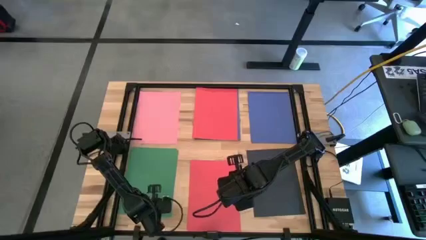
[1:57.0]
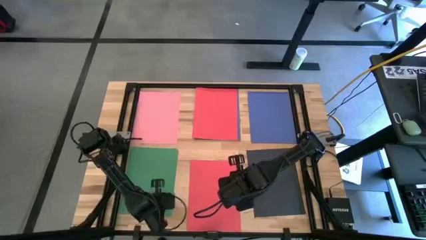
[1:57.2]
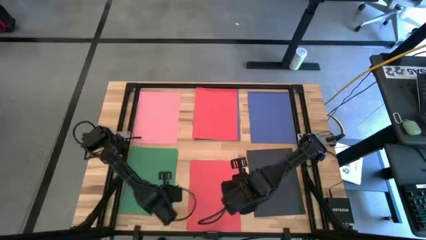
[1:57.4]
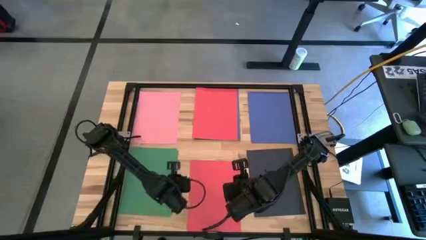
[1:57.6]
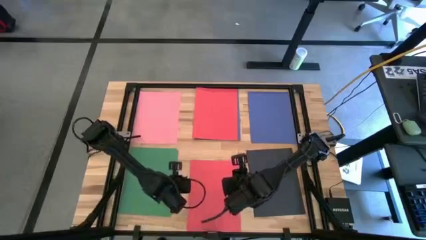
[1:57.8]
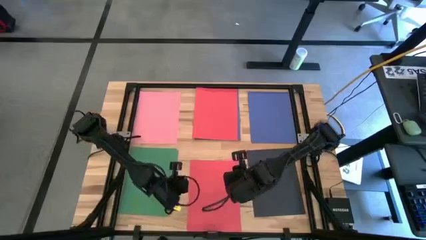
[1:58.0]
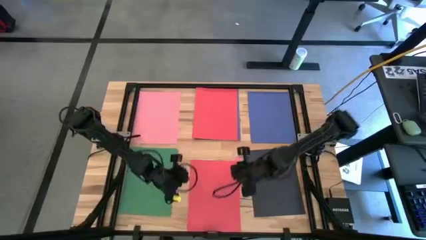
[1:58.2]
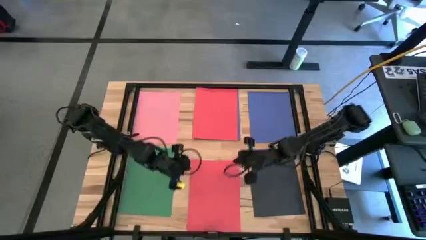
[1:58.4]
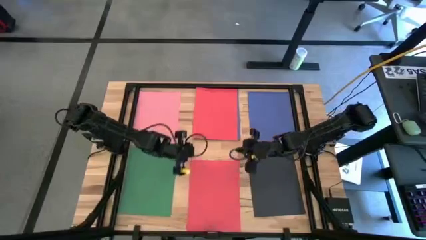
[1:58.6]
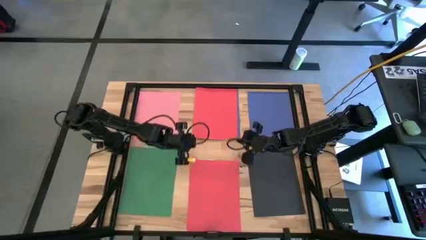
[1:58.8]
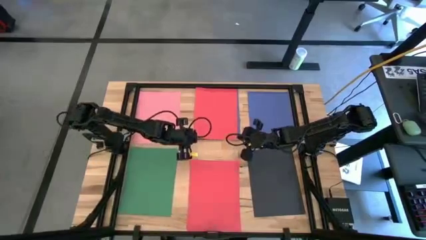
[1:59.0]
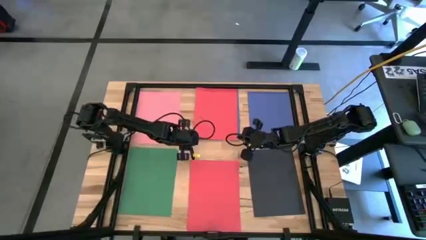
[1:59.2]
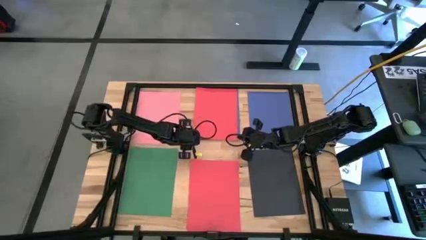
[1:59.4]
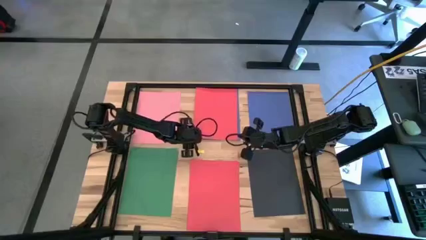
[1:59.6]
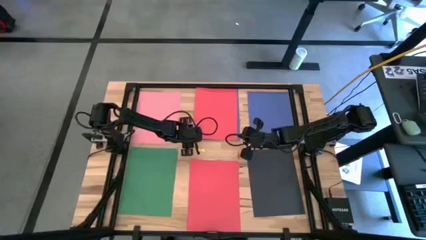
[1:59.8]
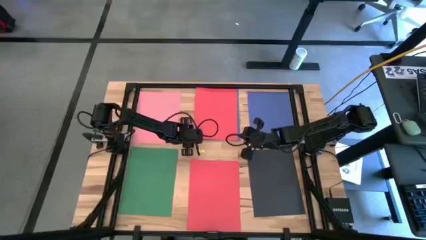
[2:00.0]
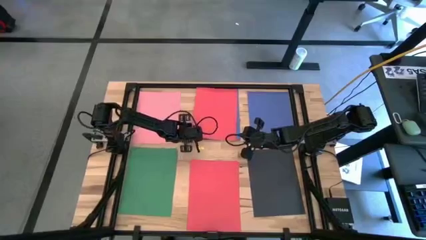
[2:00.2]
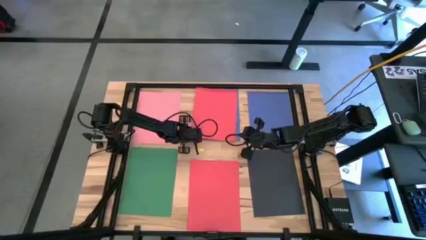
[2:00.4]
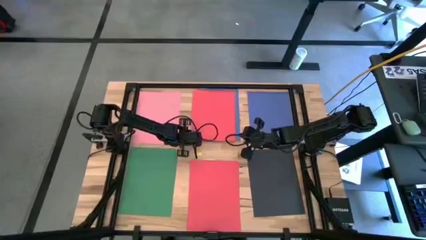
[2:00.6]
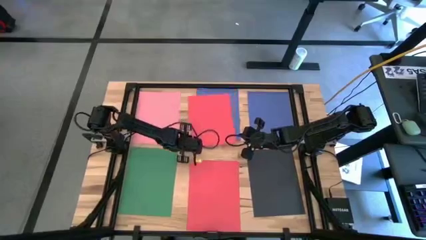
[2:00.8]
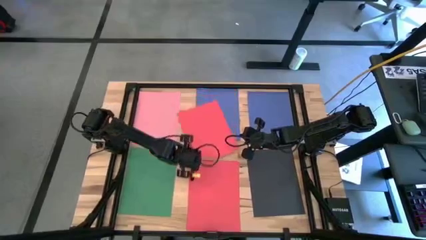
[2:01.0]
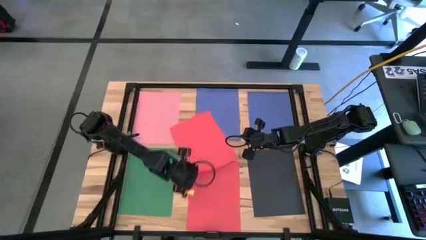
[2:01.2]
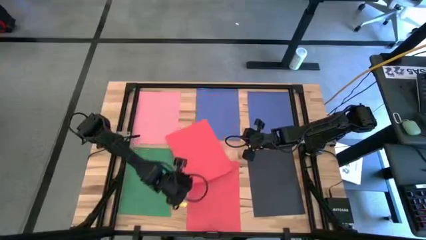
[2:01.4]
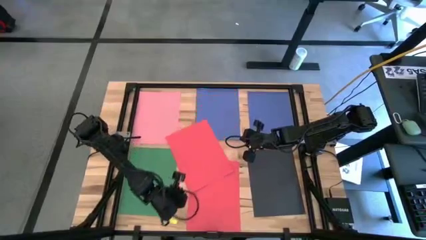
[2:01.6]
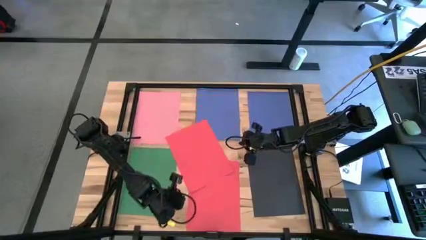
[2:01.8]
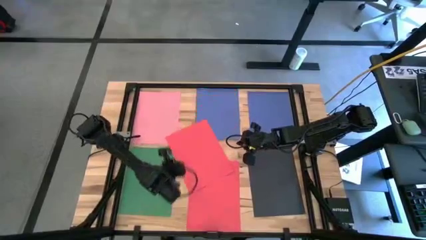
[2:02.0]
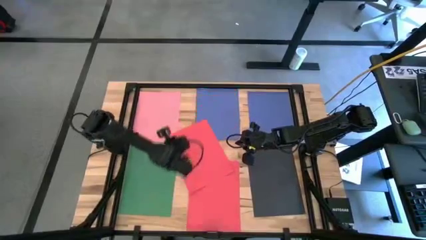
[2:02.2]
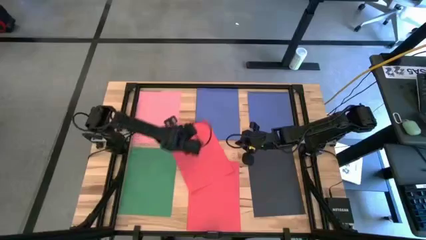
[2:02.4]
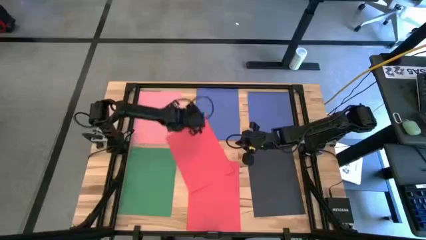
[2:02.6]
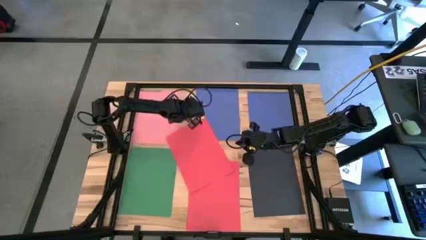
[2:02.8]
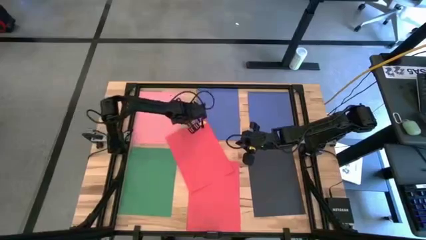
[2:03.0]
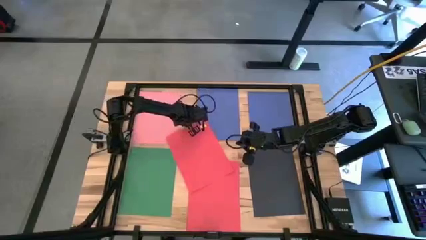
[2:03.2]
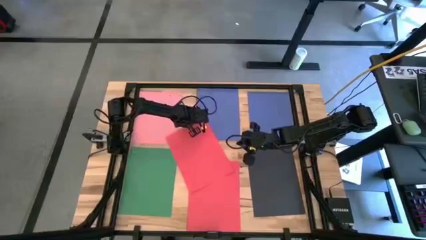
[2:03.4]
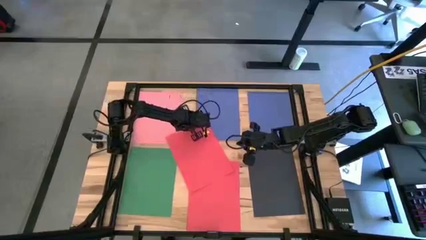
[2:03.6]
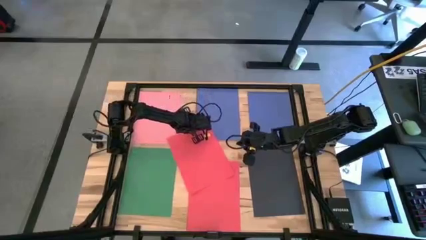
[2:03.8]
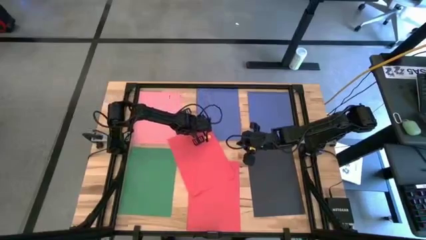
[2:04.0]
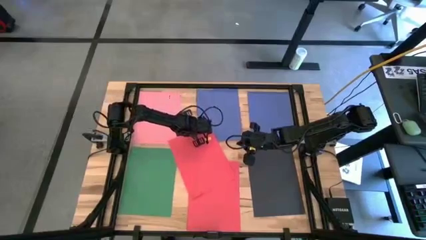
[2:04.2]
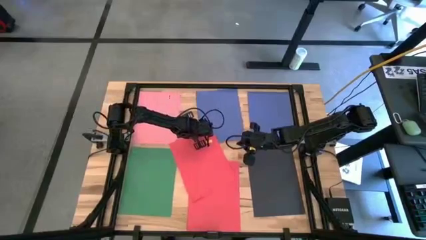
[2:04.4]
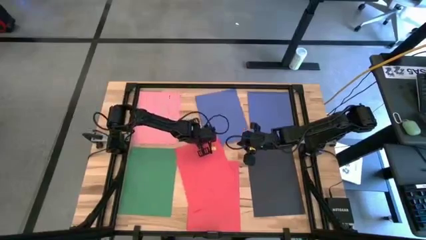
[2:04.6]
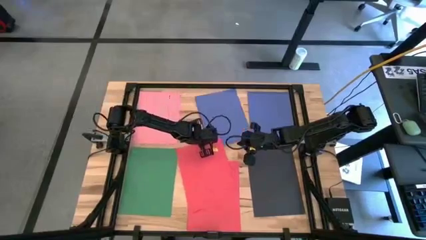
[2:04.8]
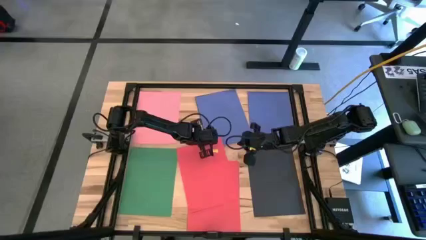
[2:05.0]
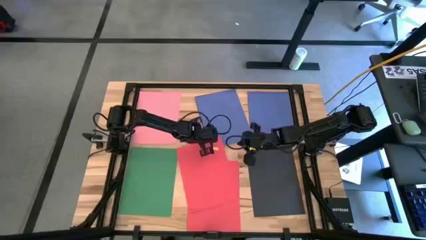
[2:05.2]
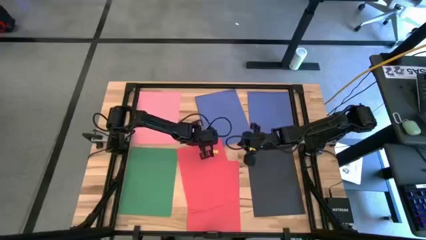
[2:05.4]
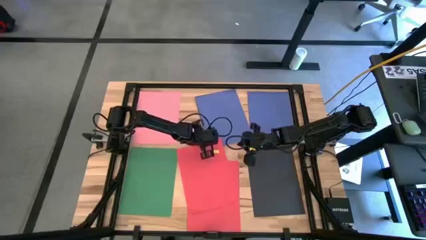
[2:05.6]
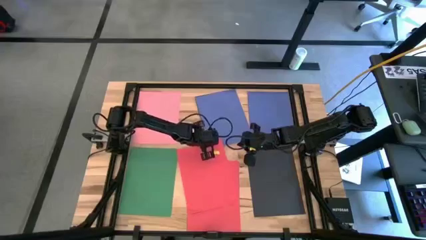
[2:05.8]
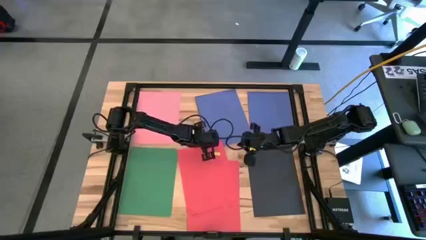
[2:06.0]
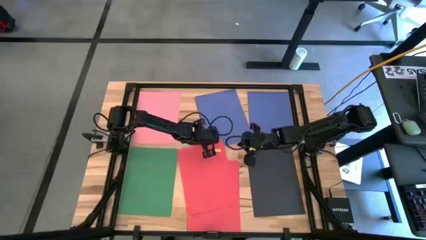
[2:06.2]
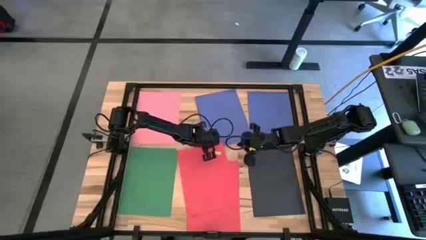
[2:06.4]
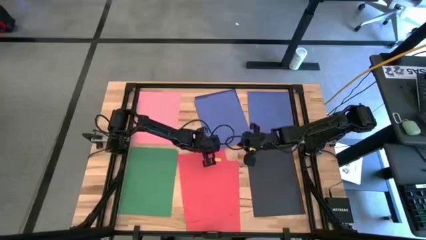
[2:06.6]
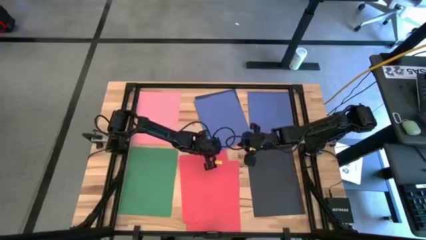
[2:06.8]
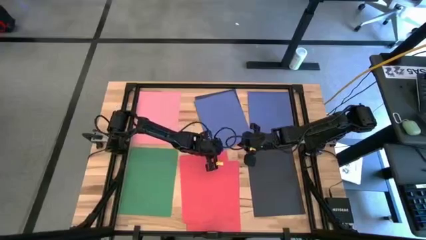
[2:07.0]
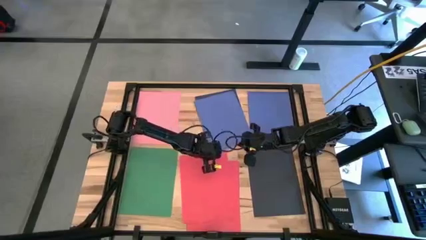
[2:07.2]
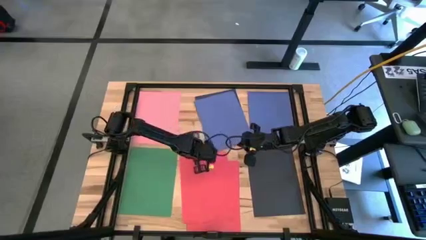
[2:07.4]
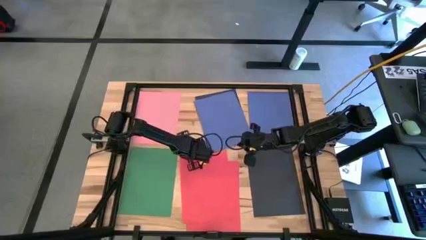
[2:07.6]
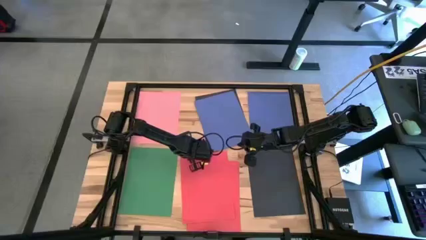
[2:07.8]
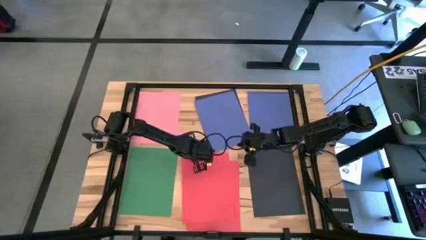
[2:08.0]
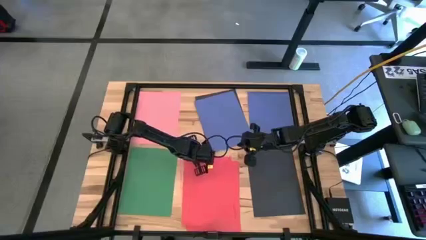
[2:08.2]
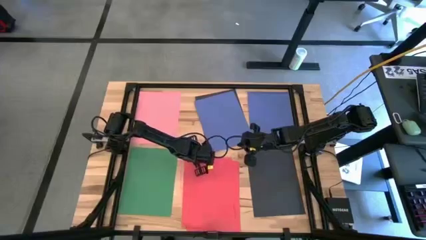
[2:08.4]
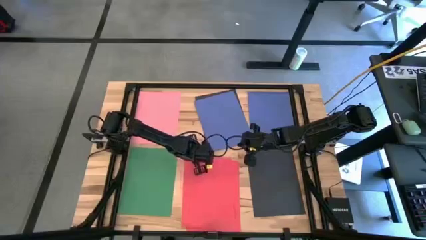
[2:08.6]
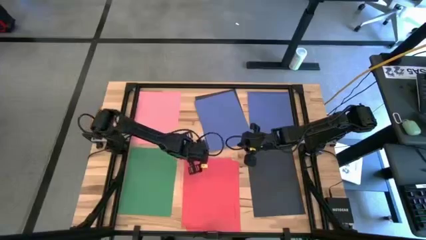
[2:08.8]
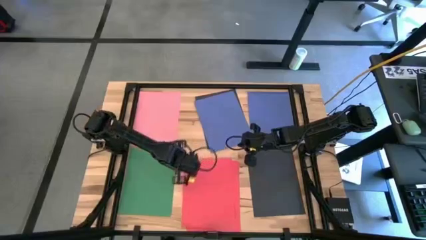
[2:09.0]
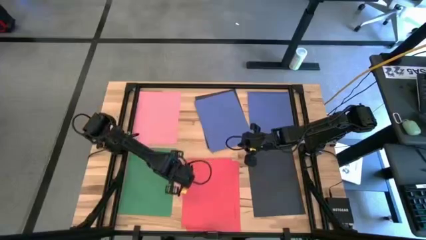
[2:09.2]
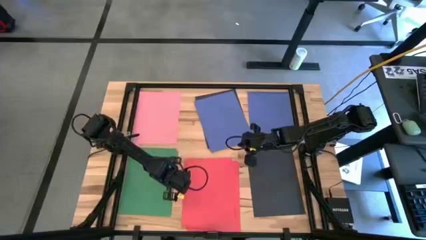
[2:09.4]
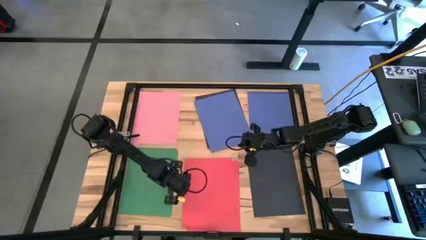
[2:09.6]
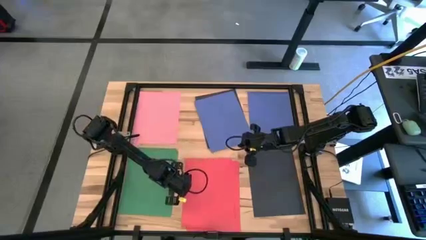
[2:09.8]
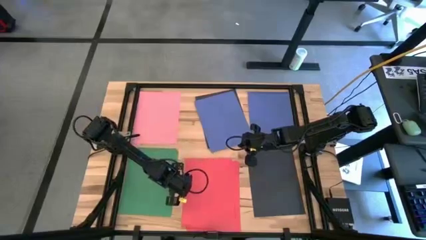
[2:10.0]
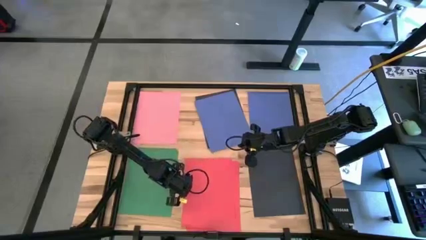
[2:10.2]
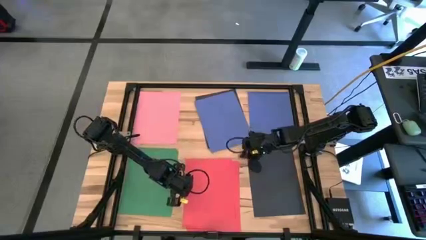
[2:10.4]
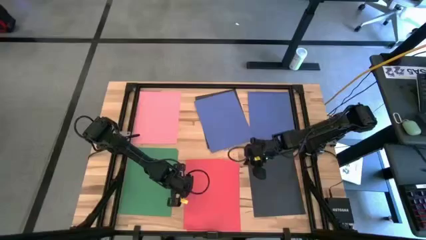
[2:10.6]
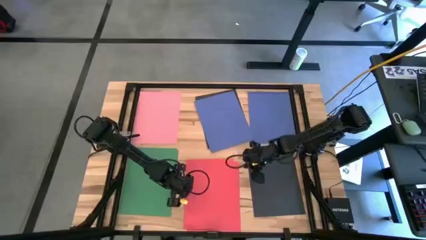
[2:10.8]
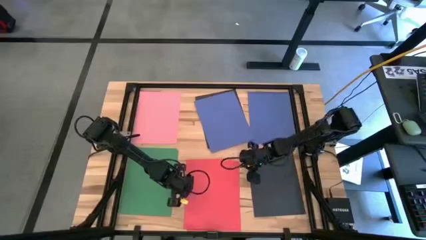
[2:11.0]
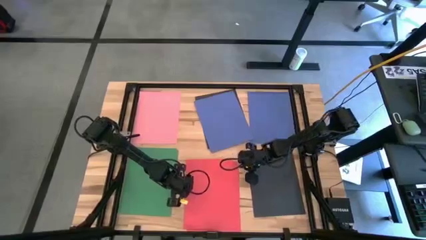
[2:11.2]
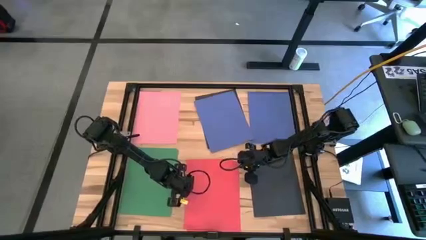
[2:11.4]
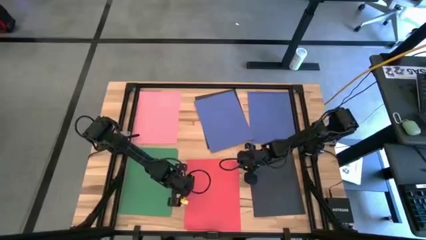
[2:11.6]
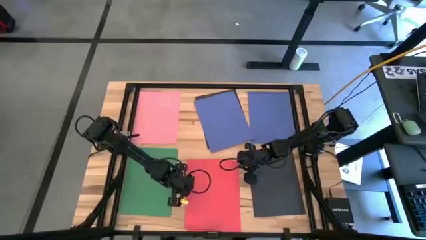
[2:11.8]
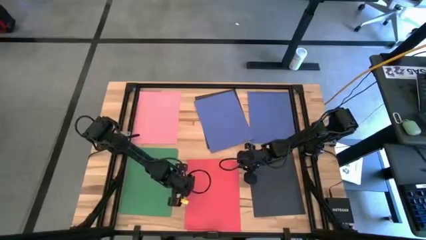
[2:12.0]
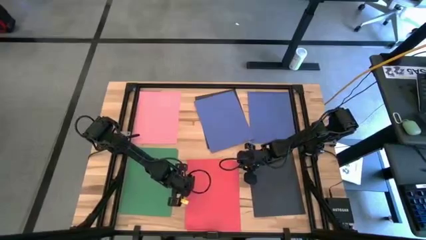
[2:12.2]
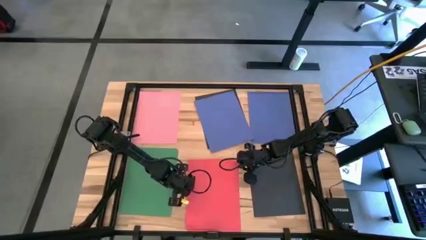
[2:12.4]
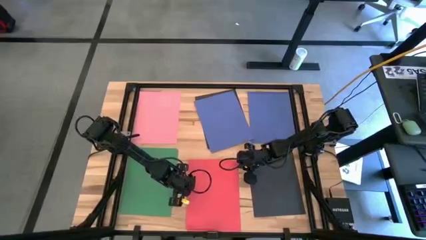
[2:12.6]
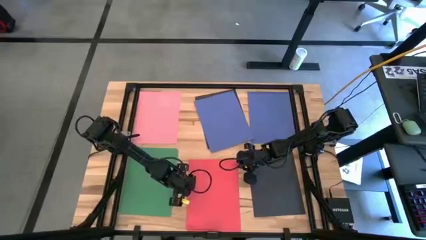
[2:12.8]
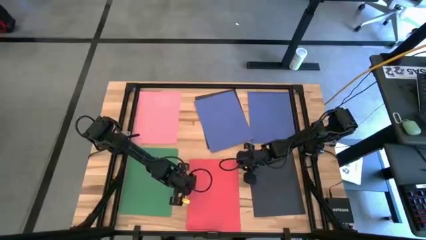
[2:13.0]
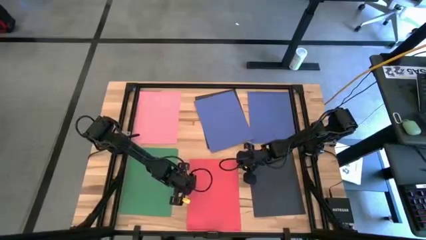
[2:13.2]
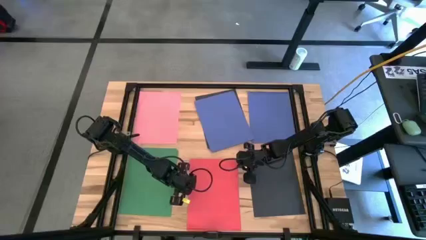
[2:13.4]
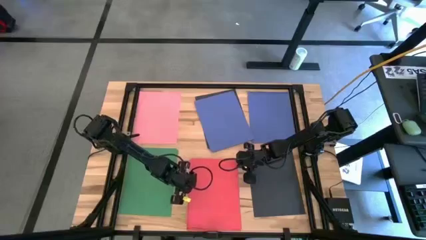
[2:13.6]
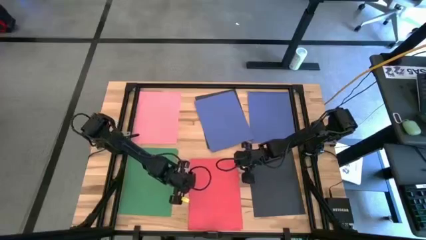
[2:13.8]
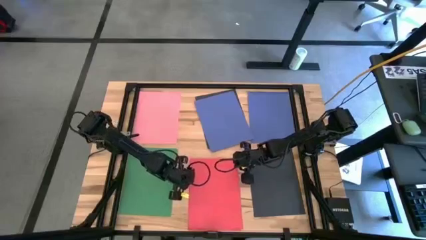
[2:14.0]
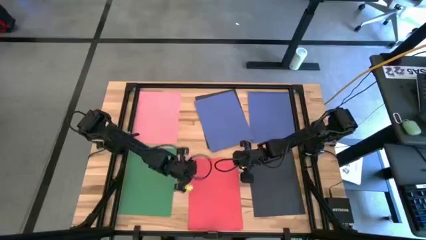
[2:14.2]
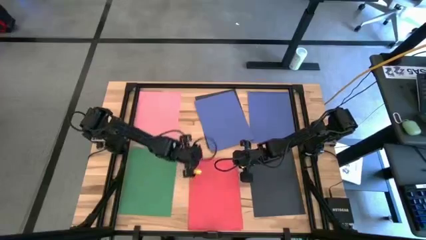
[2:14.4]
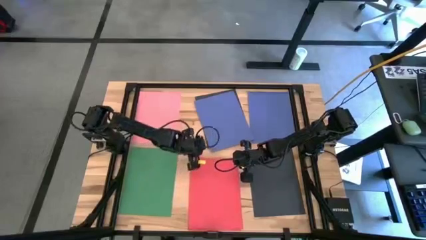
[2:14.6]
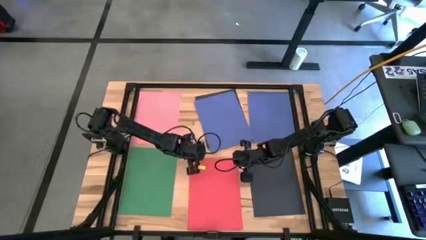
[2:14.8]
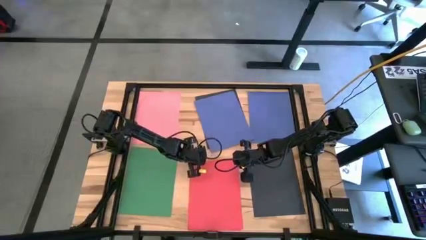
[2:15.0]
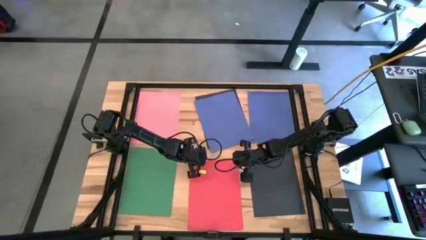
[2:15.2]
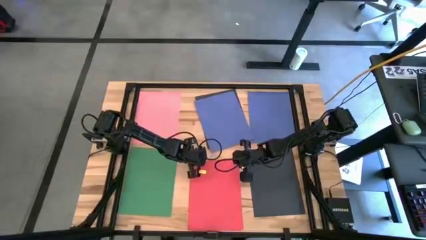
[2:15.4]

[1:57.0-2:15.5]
Task: Organize paper
Stack the red paper on top of the red paper
